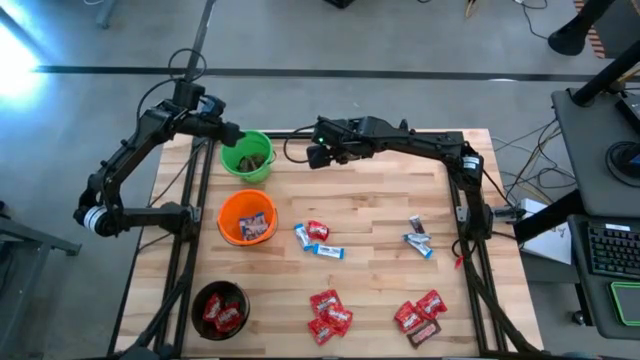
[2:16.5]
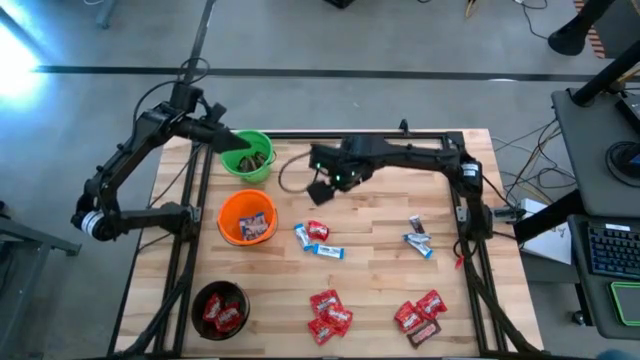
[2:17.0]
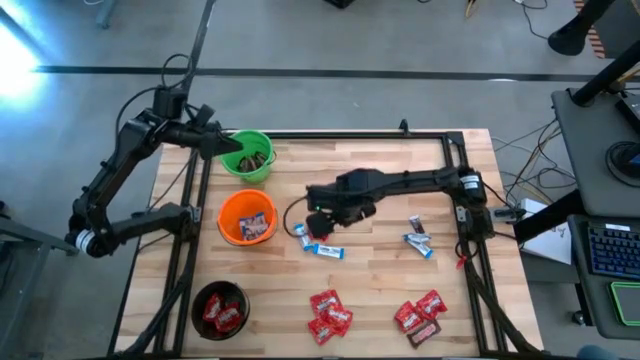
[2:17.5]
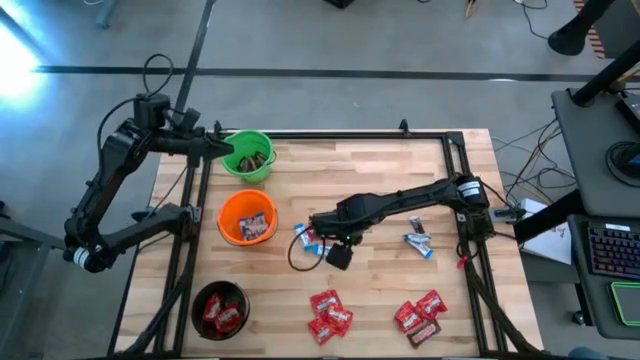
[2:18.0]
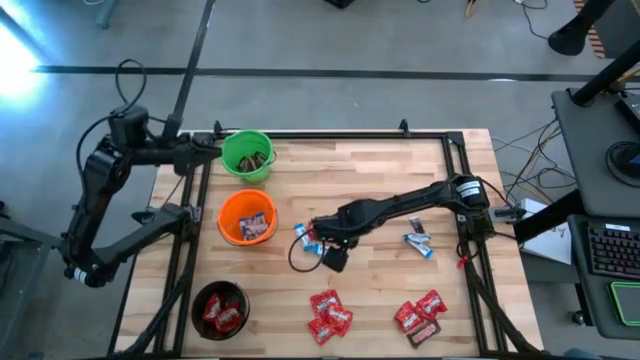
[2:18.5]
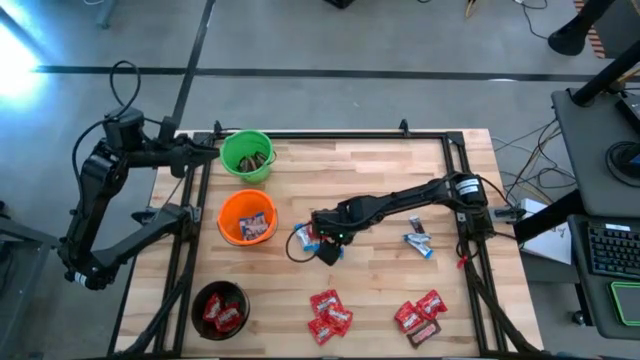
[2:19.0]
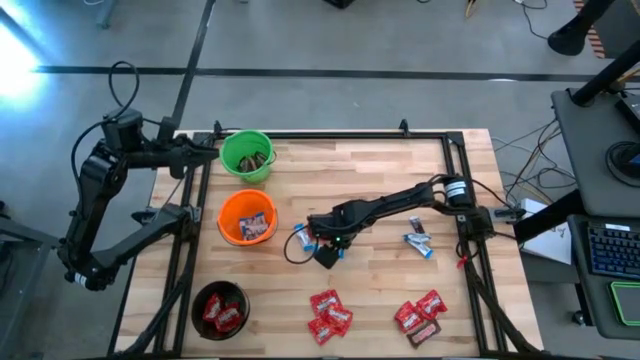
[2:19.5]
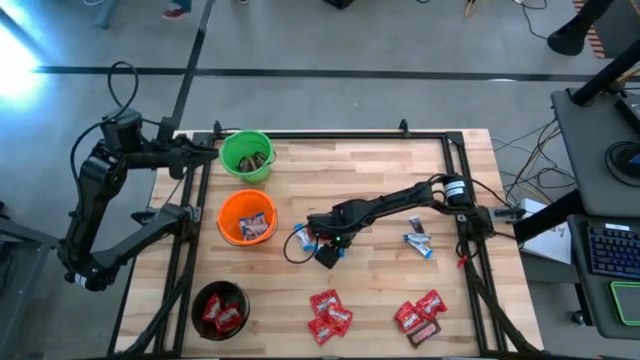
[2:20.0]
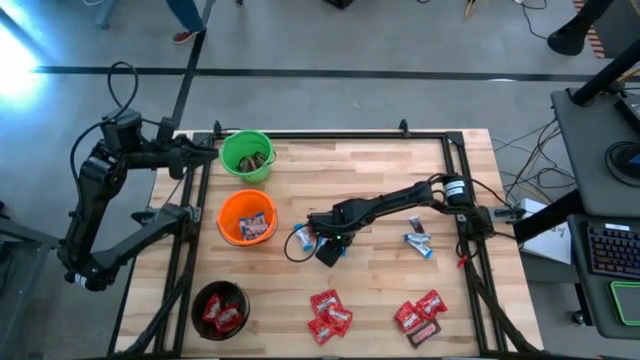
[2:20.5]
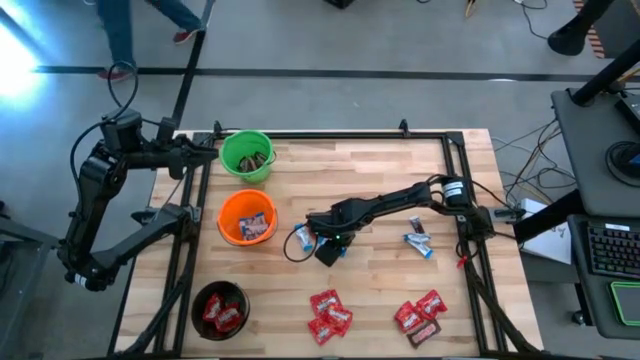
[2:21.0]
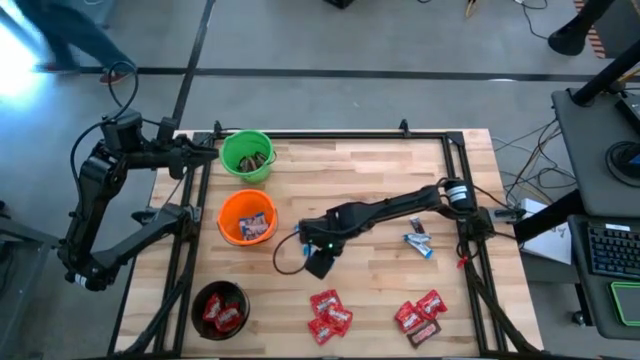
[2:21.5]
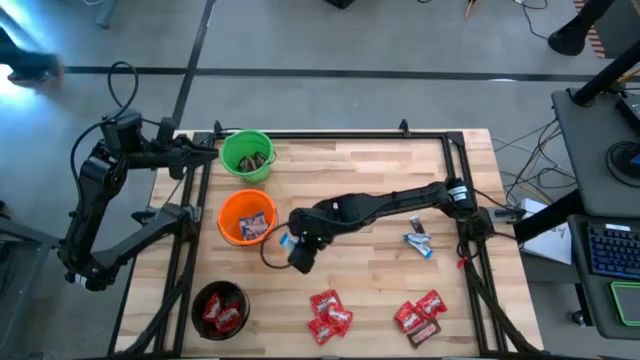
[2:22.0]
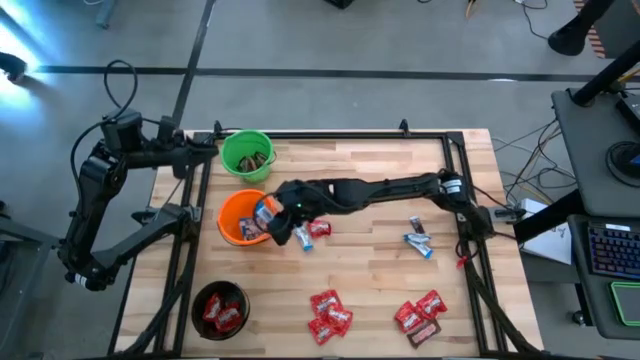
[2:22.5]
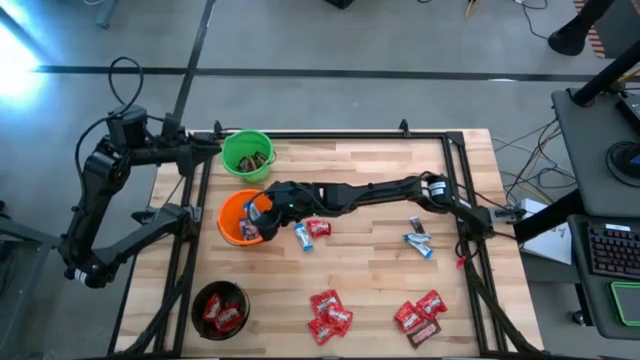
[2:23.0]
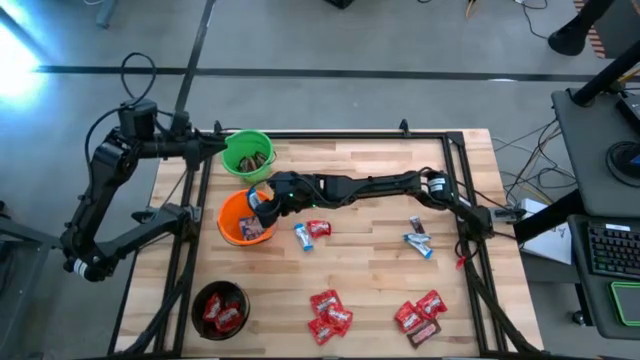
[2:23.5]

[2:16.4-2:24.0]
Task: Organize candy in baskets
Put the white chocolate into the orange bucket

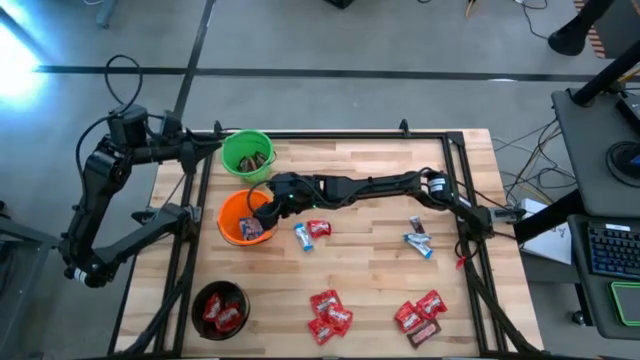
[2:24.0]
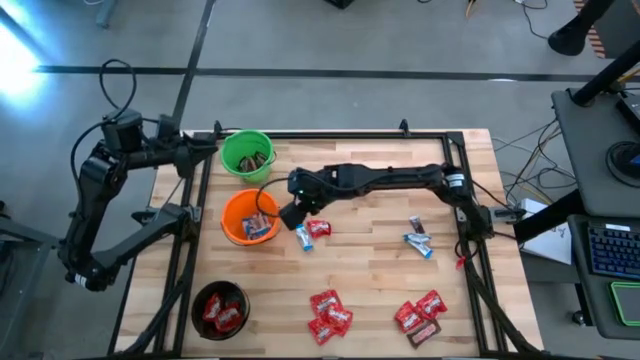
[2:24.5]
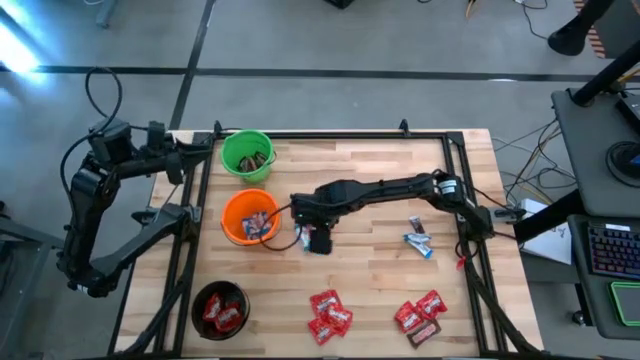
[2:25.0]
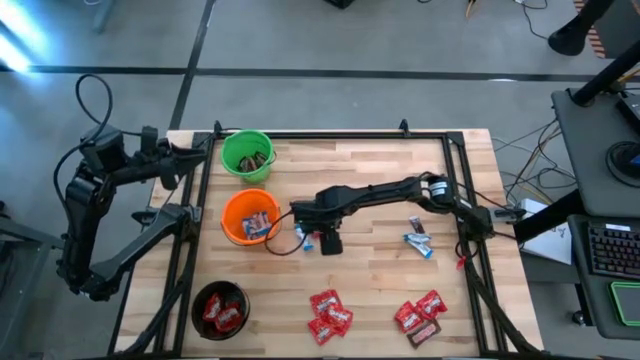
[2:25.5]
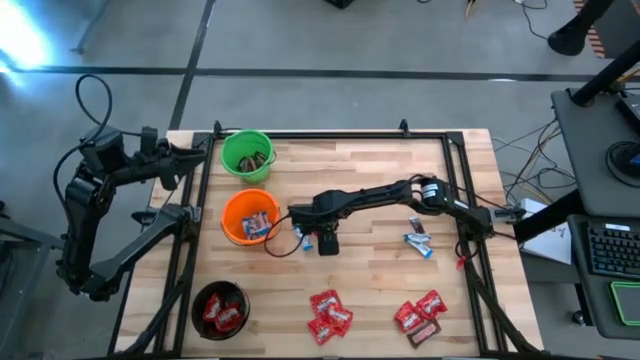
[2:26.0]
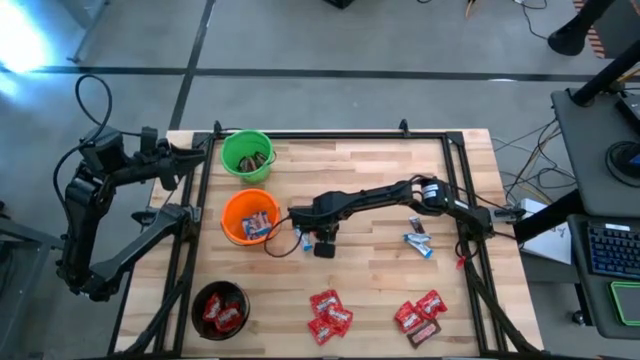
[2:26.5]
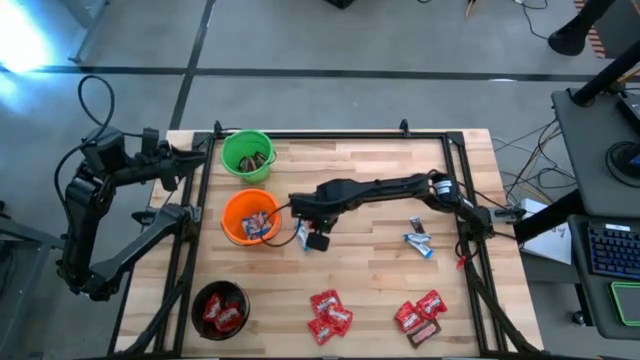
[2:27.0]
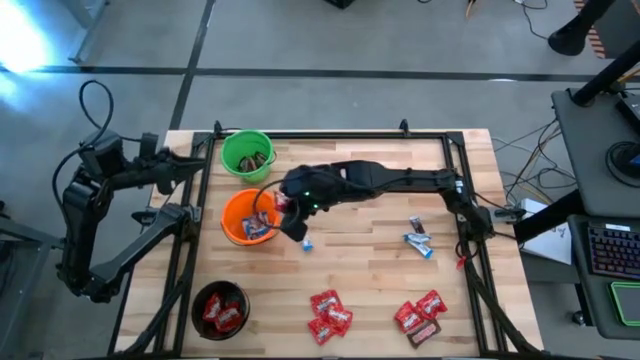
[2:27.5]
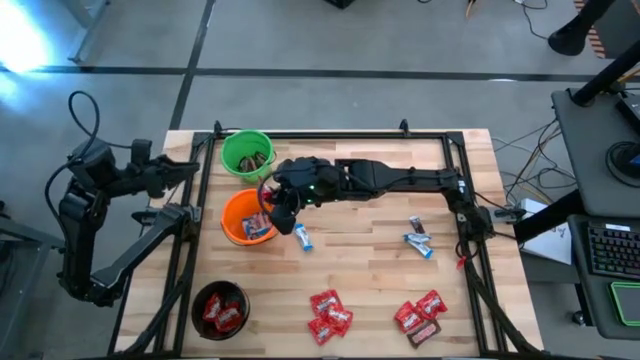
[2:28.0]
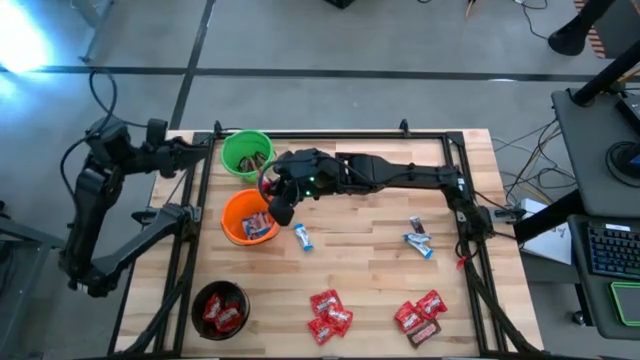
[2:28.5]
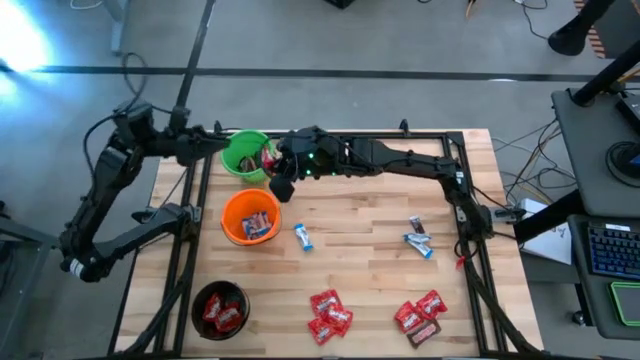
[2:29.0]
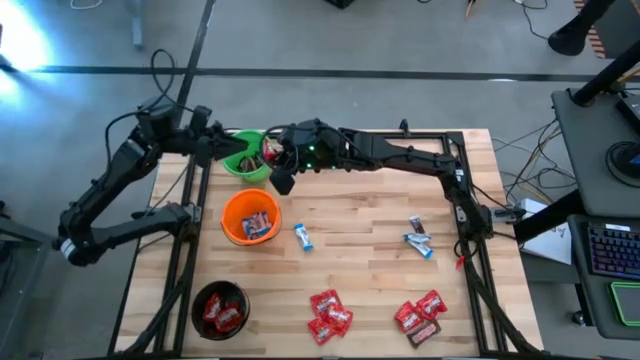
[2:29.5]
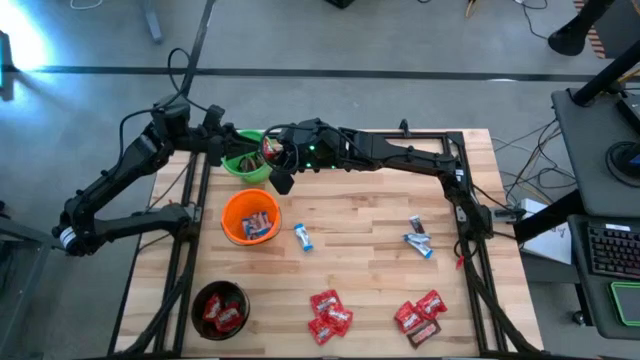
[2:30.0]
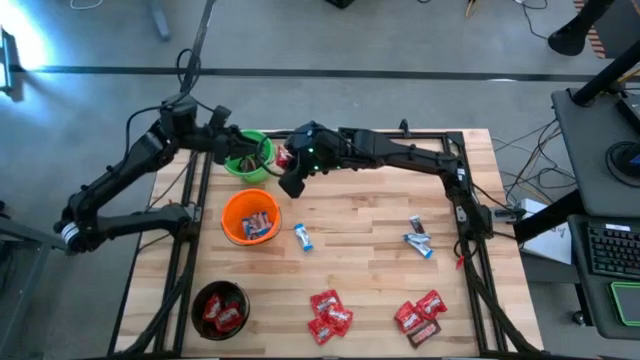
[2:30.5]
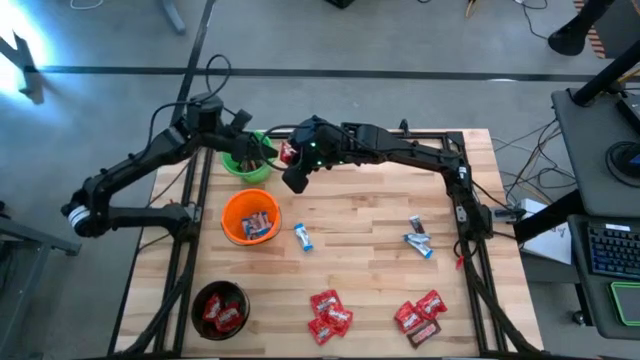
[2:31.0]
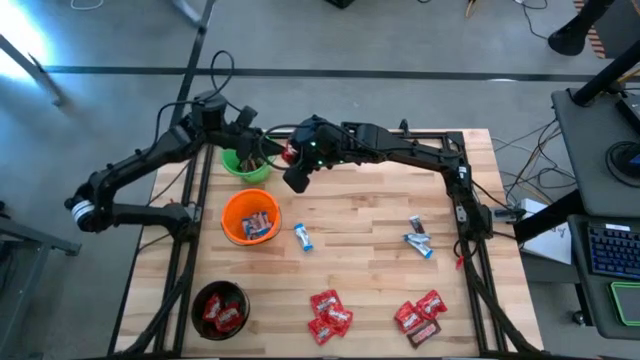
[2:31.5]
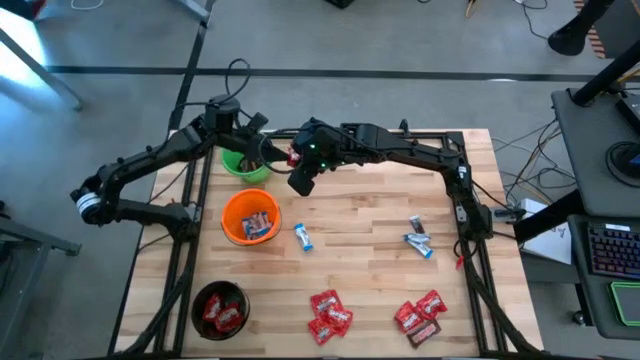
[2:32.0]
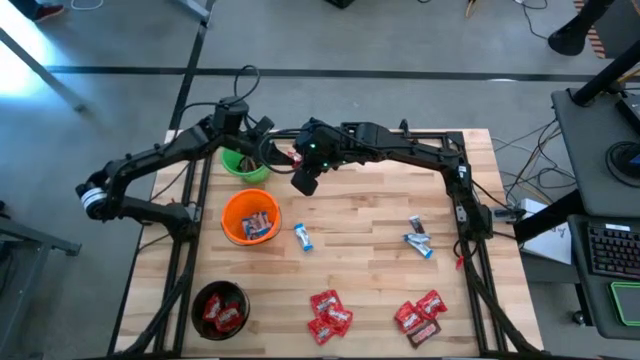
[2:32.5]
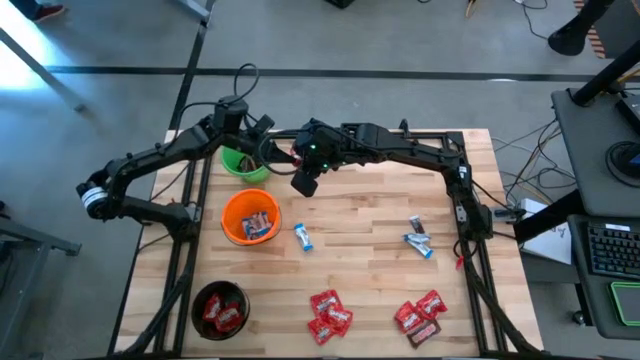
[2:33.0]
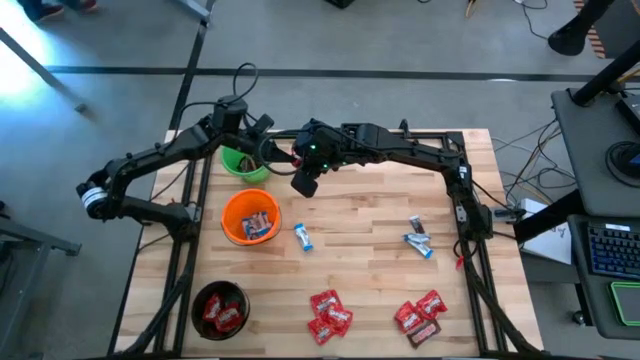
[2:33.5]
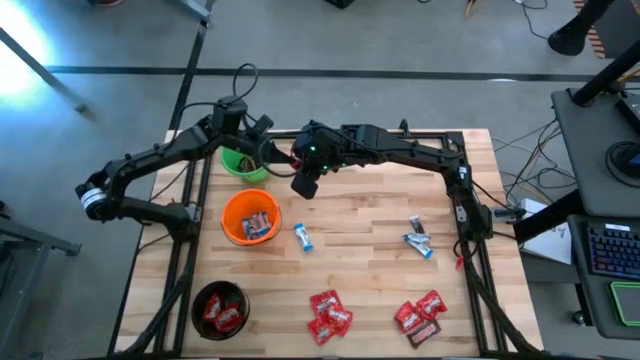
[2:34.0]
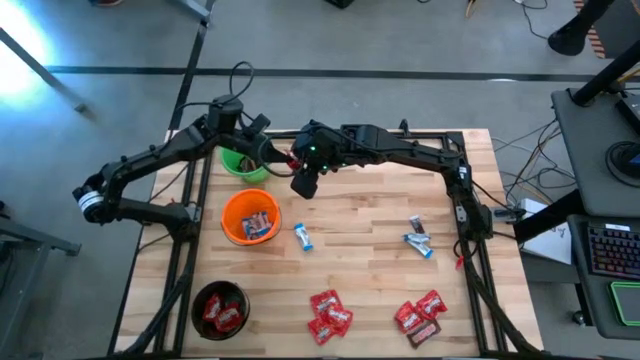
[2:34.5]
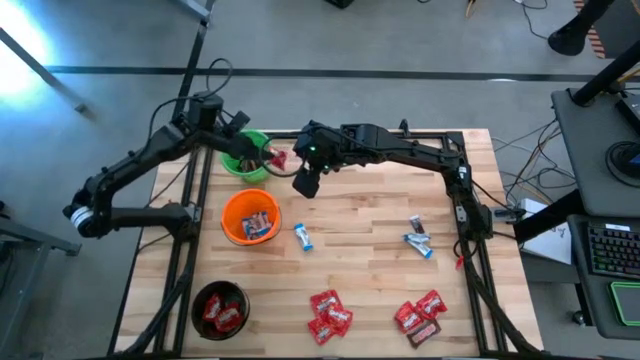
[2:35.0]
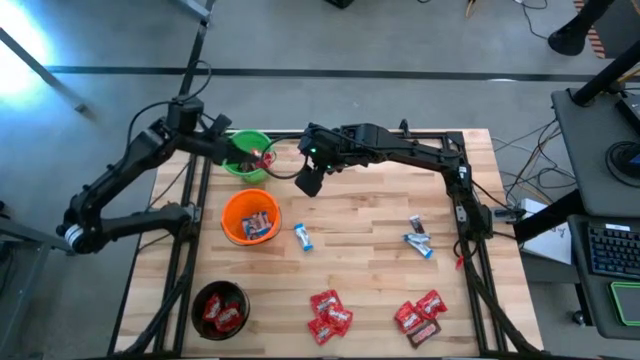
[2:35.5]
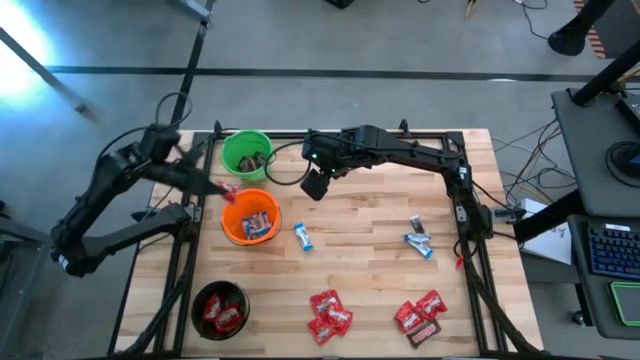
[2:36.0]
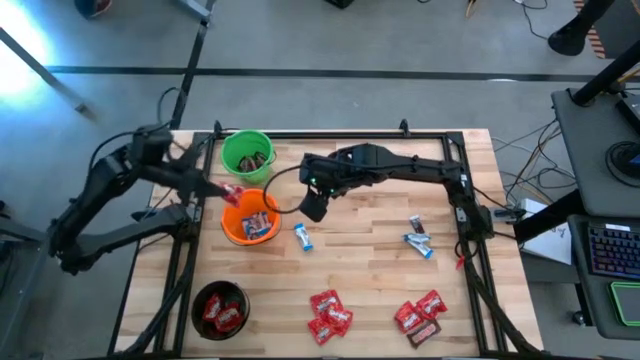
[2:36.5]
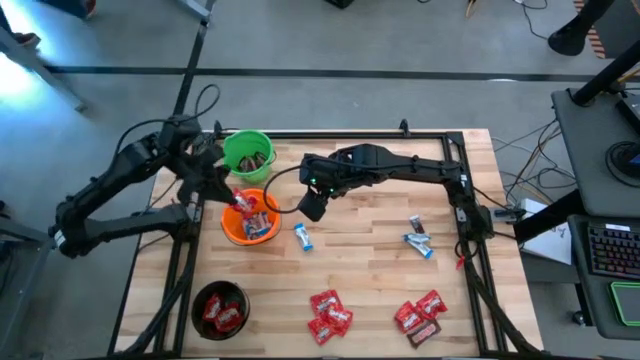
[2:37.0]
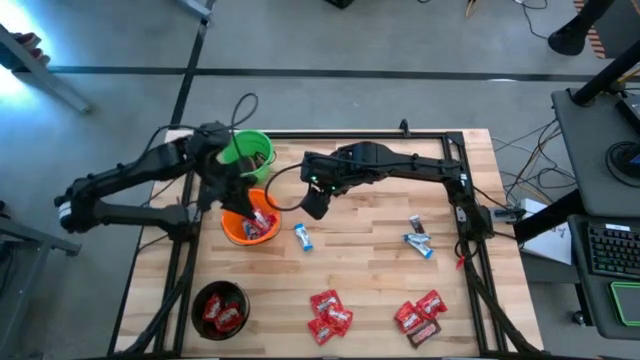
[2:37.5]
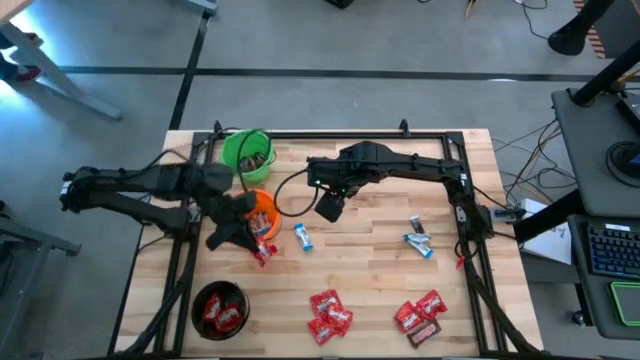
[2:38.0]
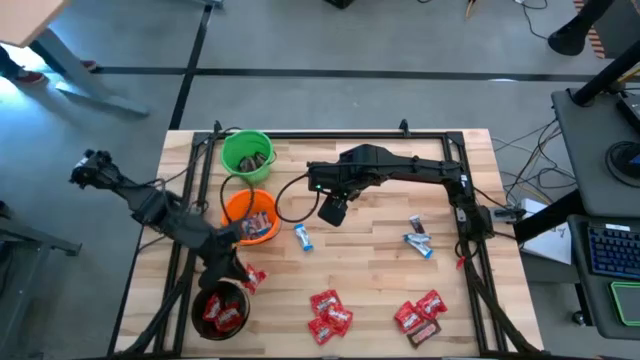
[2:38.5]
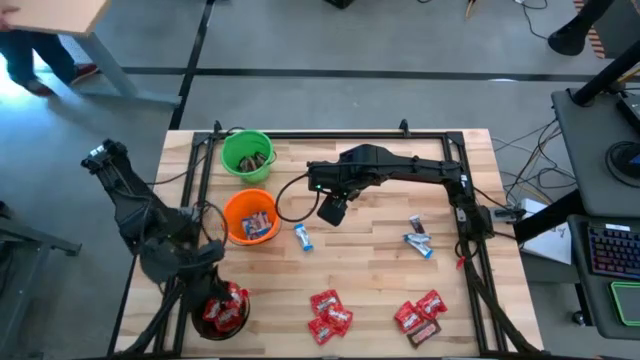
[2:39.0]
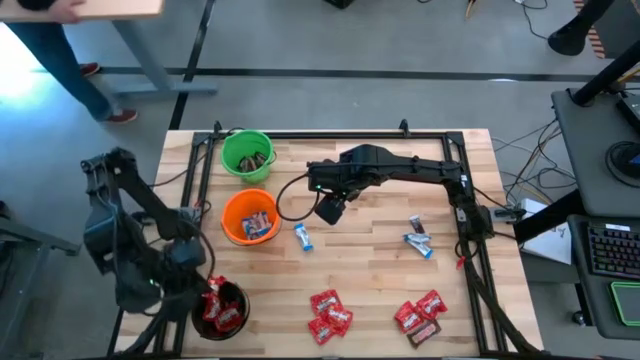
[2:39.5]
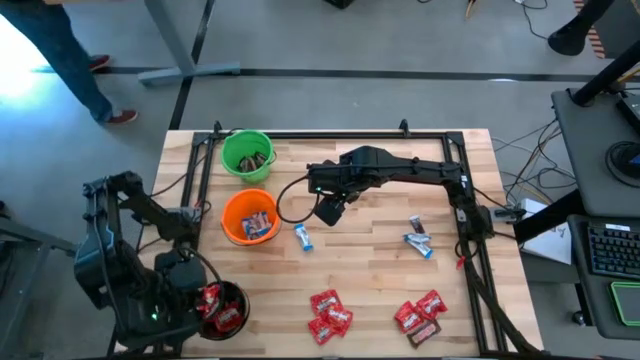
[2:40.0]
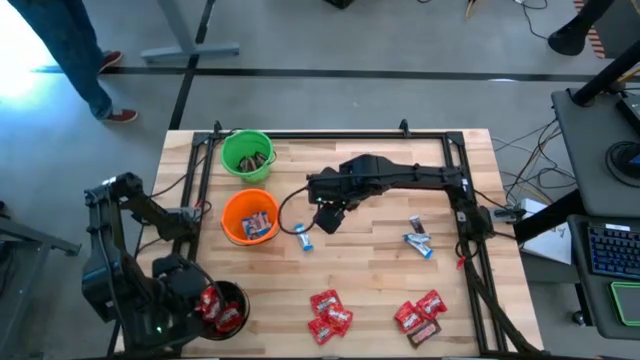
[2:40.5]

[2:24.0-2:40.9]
Put the red candy into the black bucket
